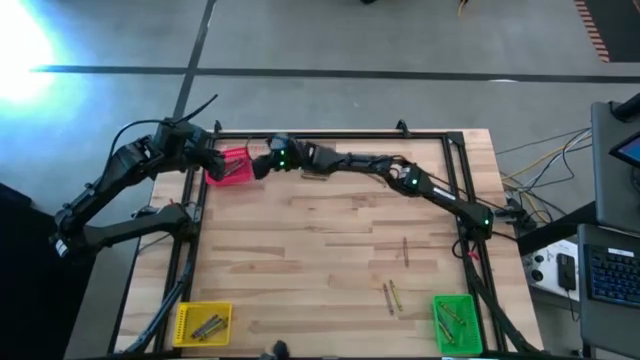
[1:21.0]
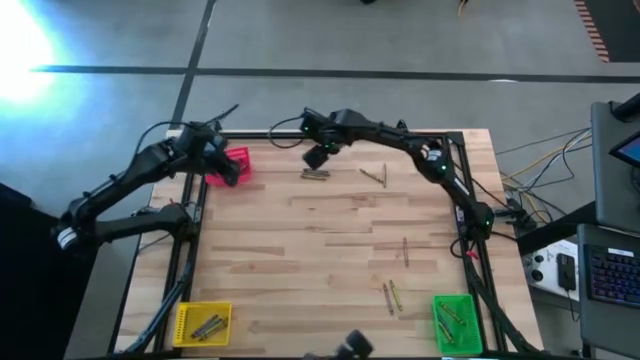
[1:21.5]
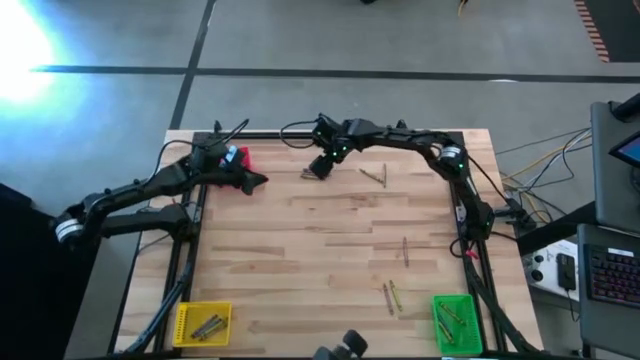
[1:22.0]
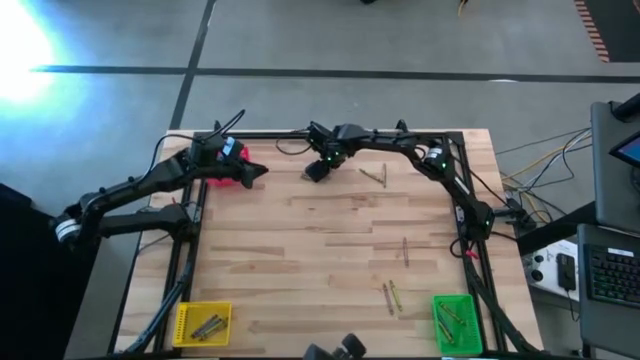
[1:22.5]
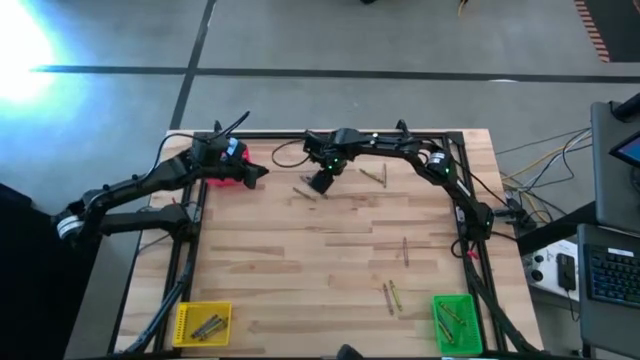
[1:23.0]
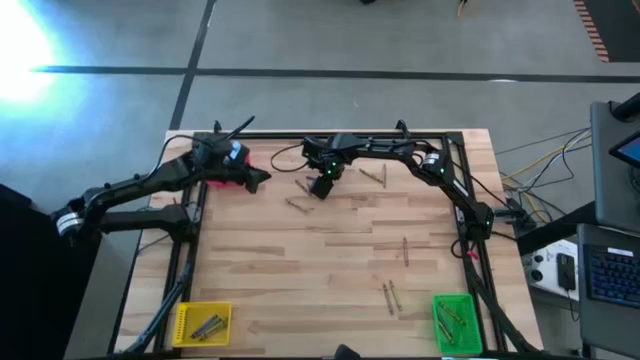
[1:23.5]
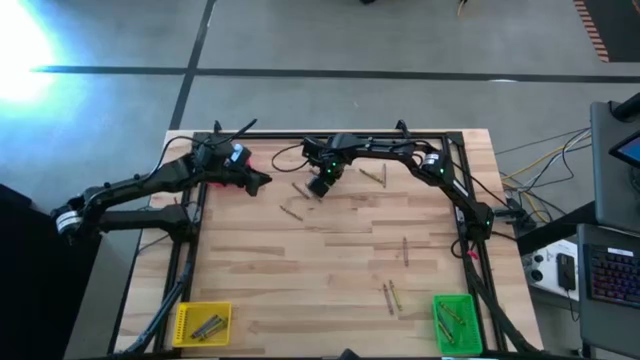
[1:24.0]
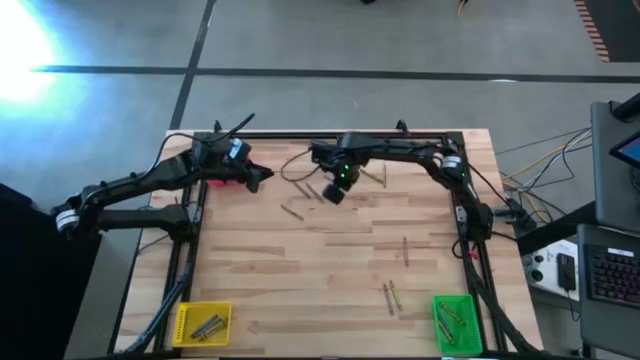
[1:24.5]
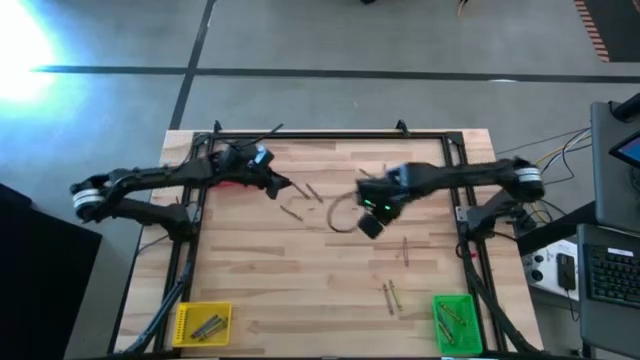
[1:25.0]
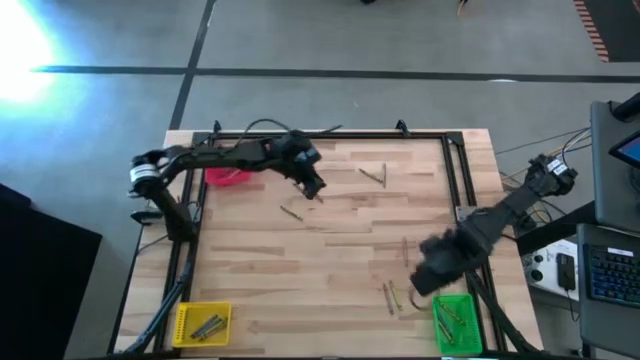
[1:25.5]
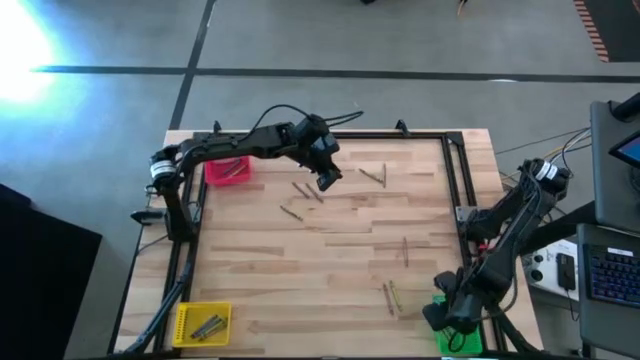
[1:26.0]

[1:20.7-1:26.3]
Task: Sort crayons
Put the blue crayon into the green bin

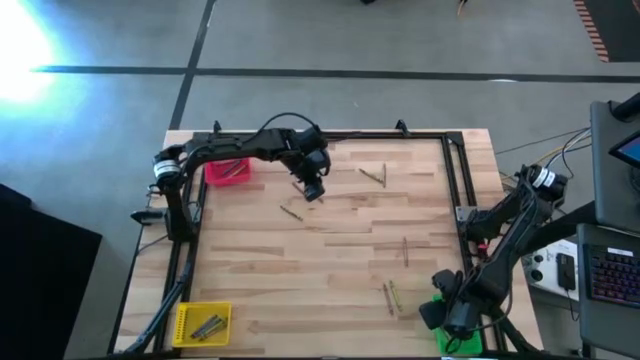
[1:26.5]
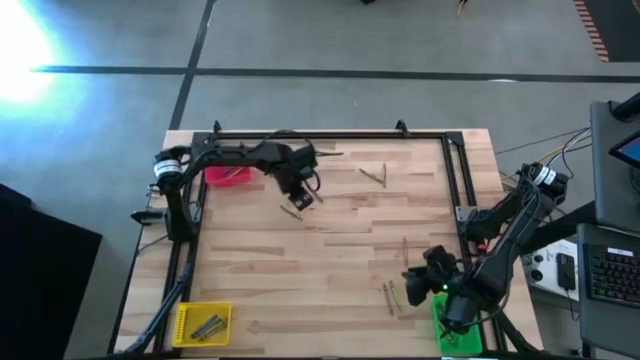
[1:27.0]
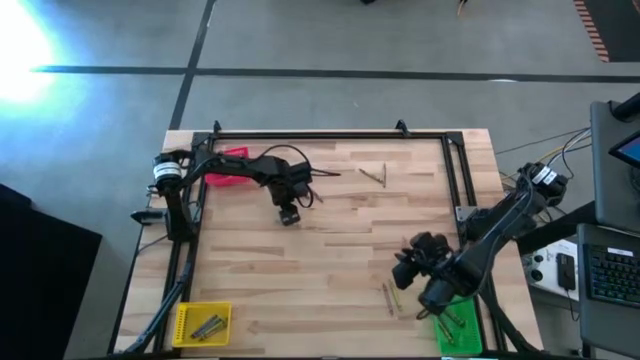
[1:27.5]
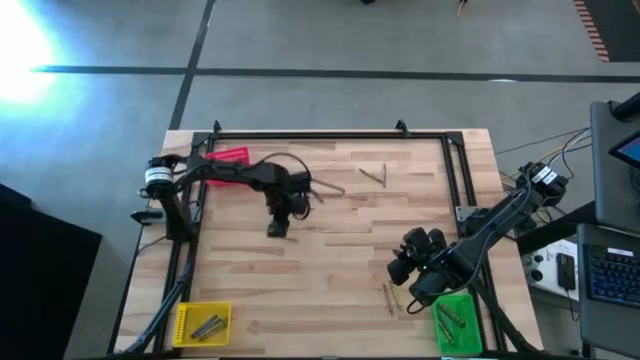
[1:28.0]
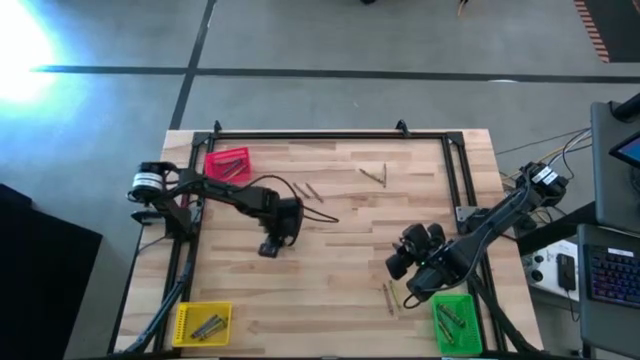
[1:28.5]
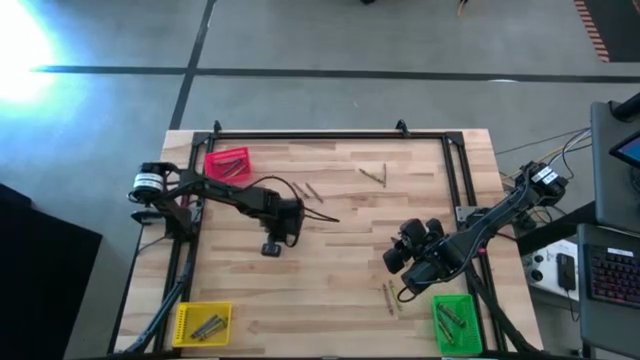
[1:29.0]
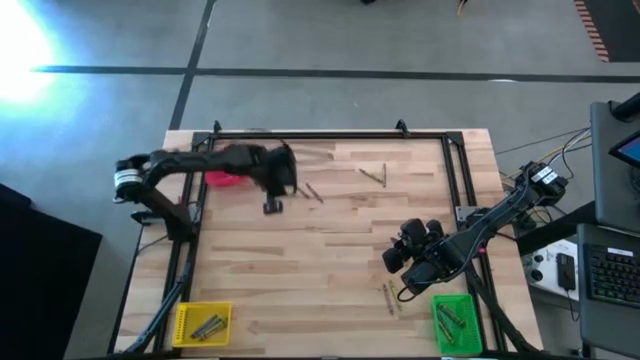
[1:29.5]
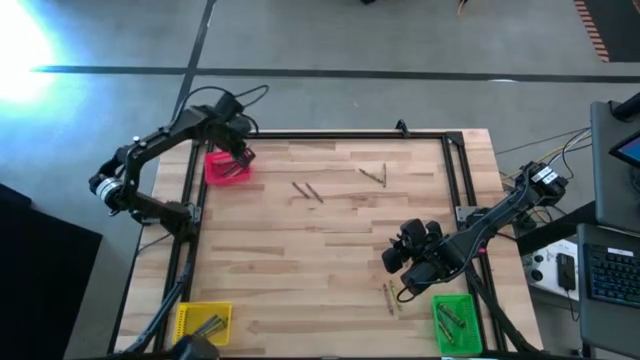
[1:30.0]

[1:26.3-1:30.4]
Put the green crayon into the red bin

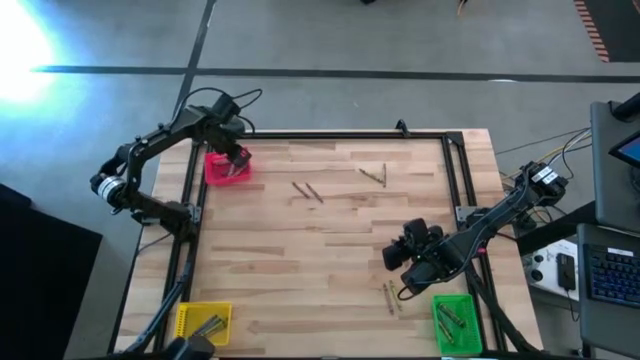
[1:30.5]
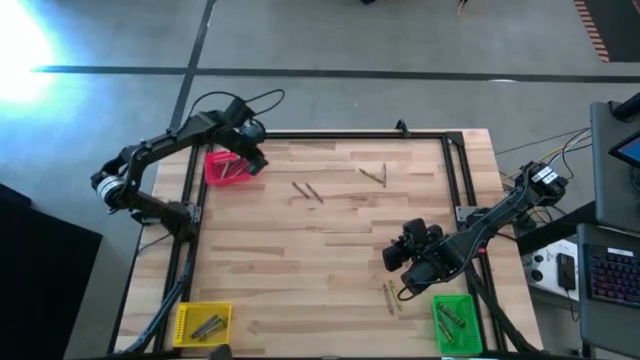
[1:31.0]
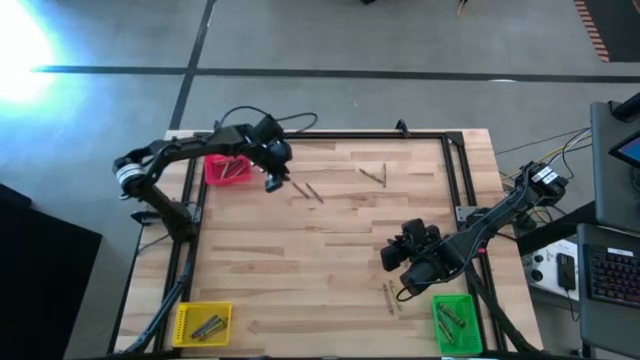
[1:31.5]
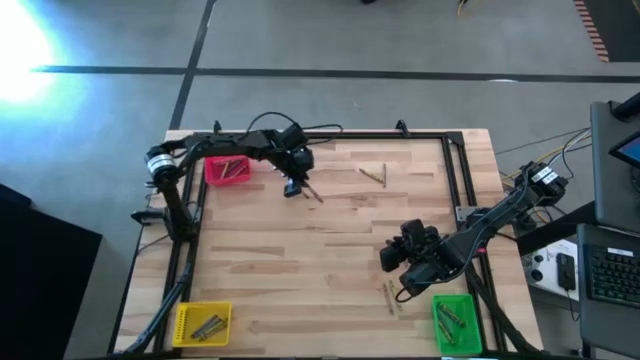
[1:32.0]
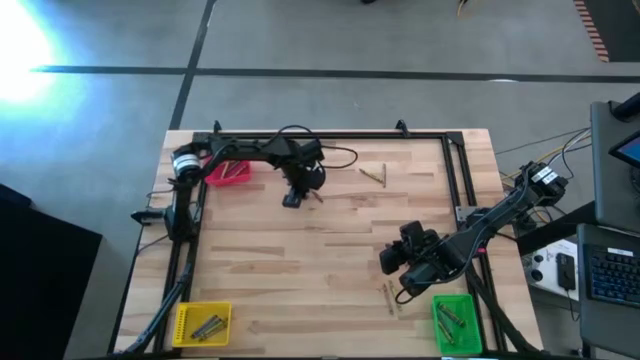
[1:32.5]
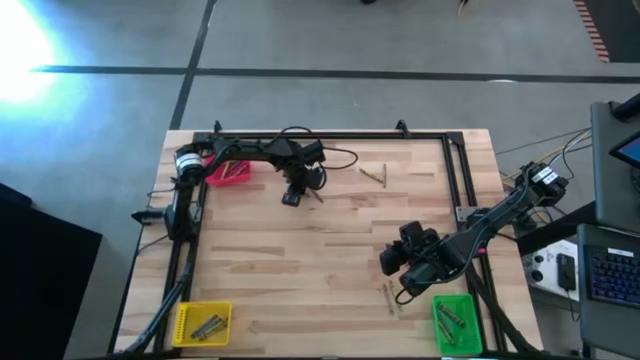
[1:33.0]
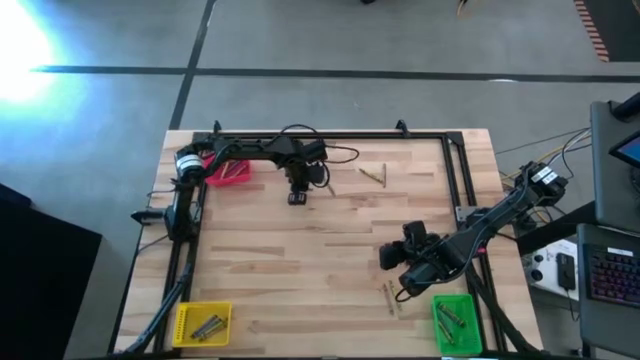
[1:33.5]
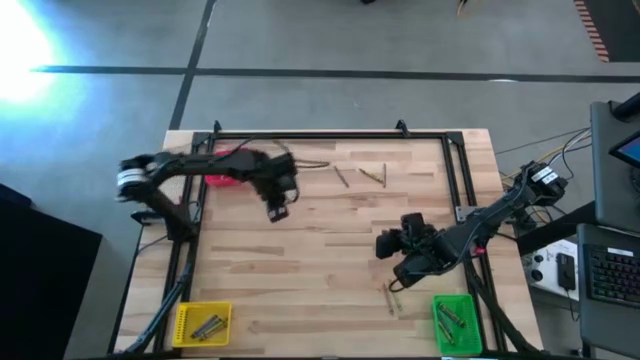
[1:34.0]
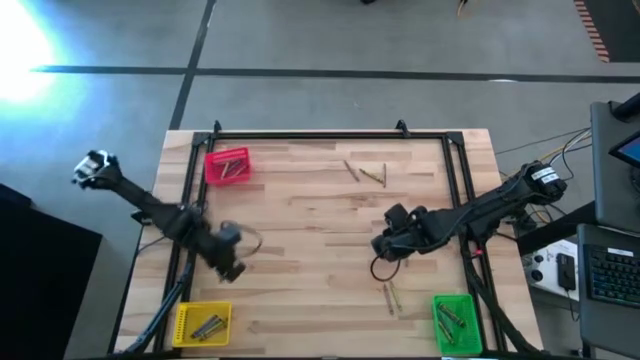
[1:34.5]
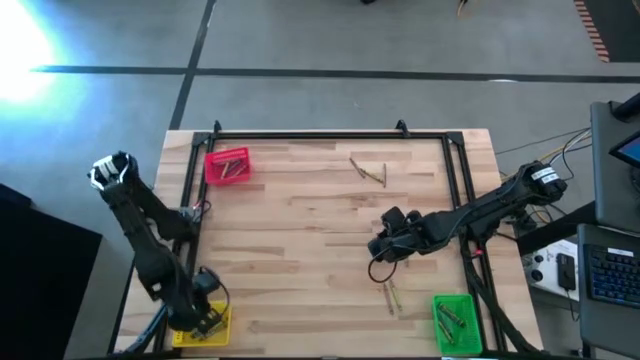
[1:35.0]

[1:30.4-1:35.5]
Put the brown crayon into the yellow bin

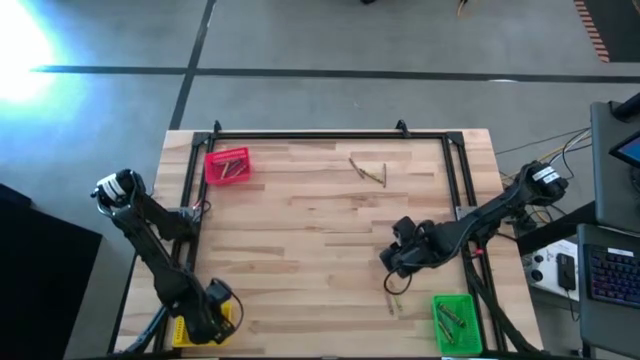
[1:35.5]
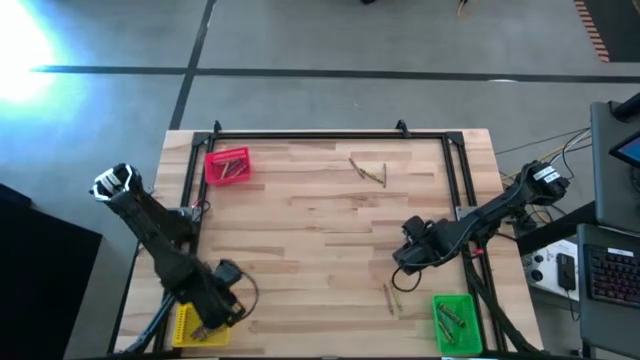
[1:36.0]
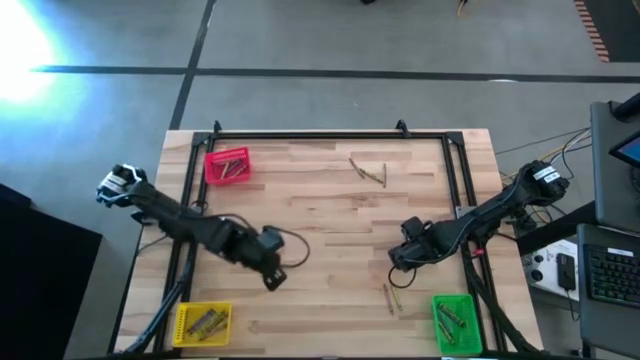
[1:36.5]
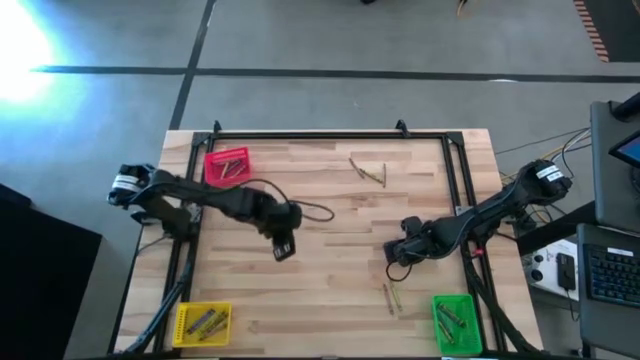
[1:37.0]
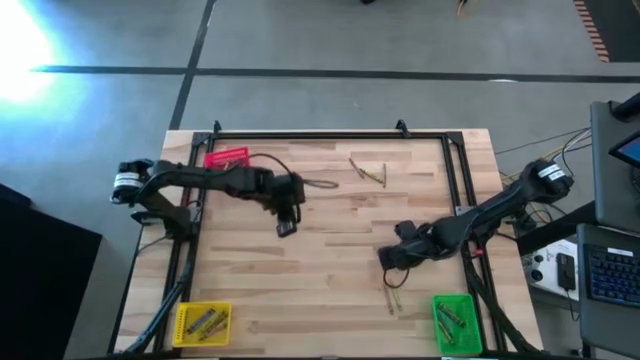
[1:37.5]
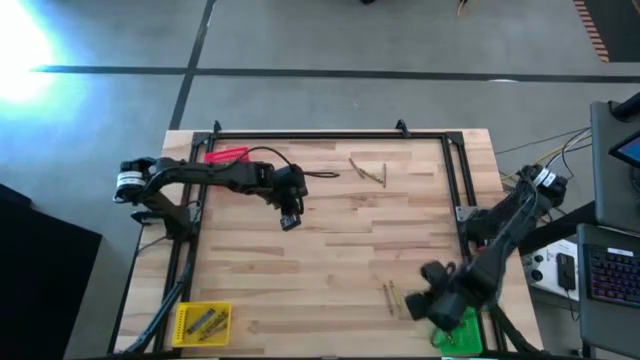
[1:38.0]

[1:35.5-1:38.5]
Put the brown crayon into the green bin

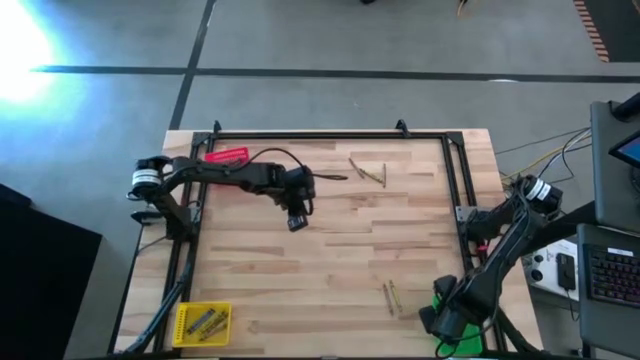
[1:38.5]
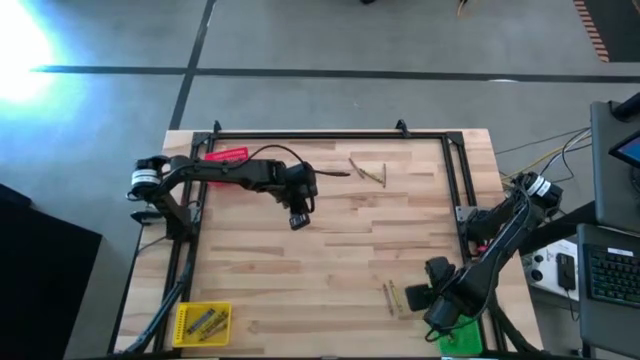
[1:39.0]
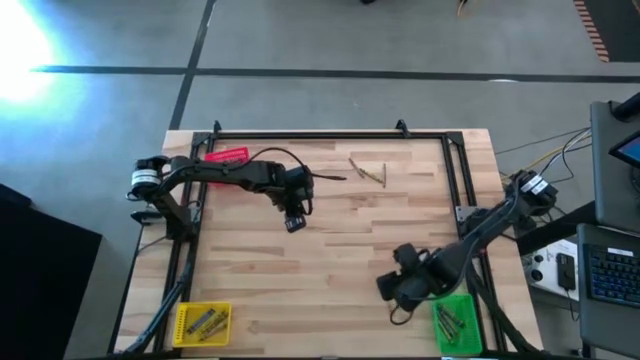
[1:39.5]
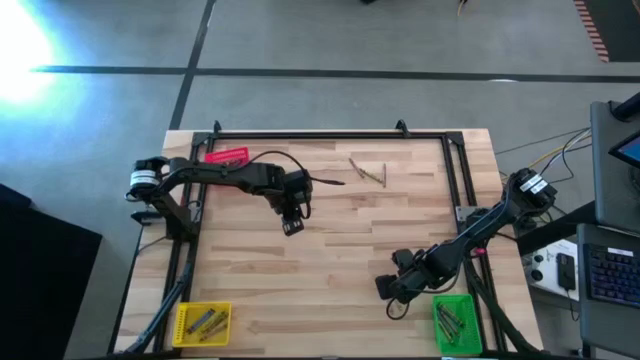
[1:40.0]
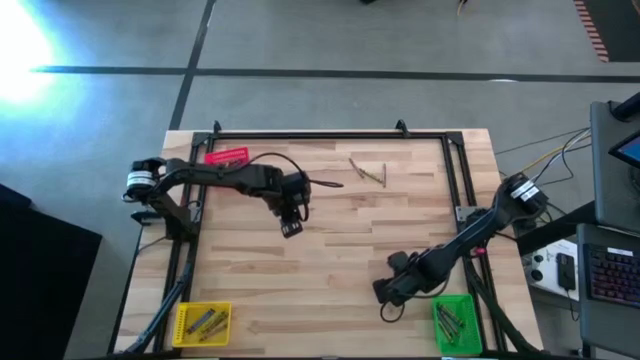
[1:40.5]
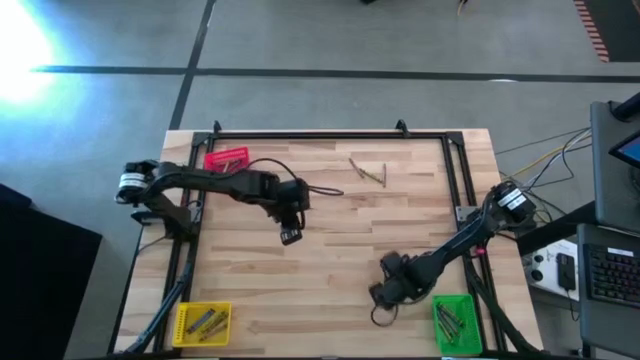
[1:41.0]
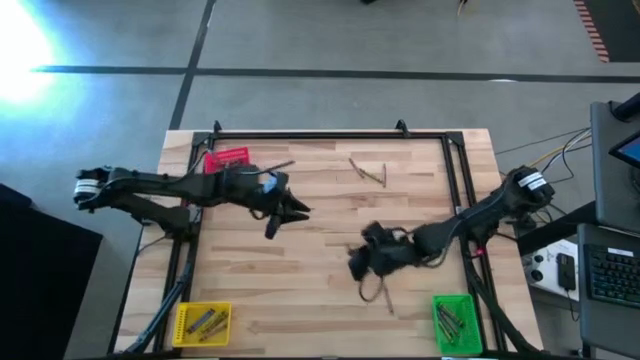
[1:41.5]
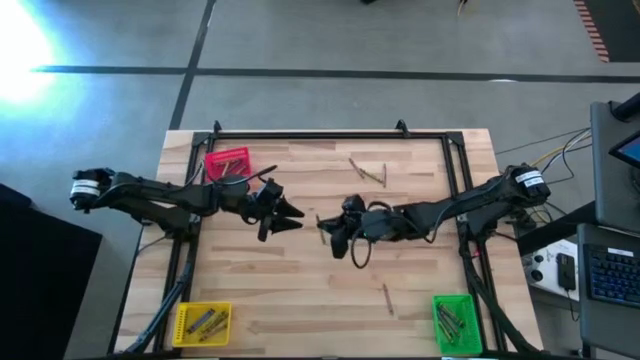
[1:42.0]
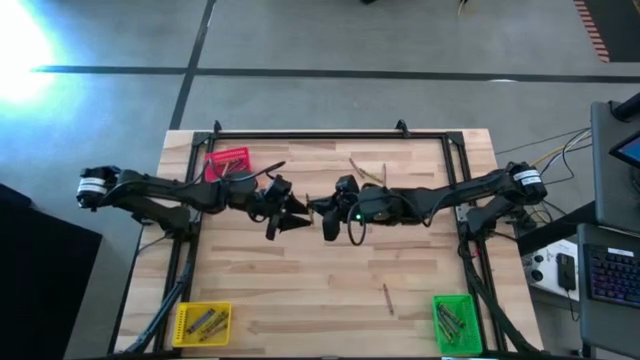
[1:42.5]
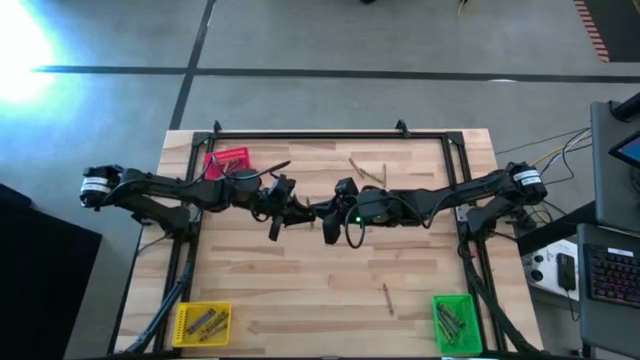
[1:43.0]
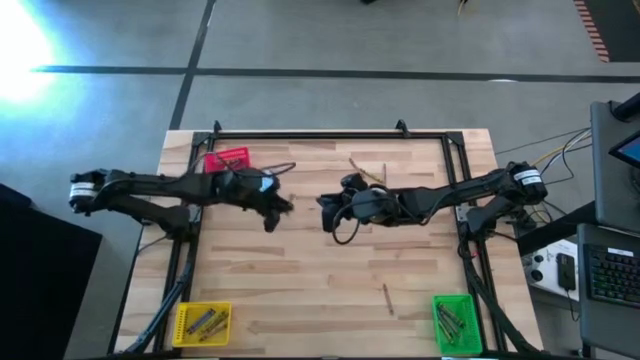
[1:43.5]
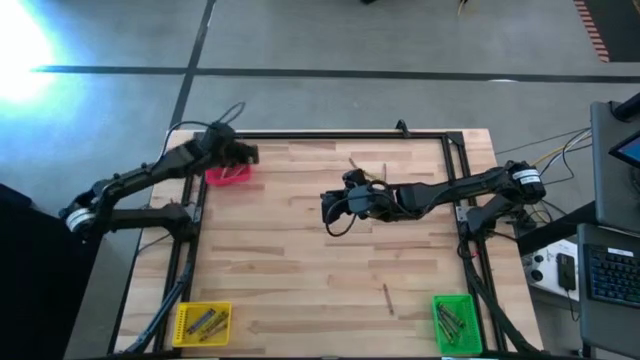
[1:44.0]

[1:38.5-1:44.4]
Put the green crayon into the red bin
